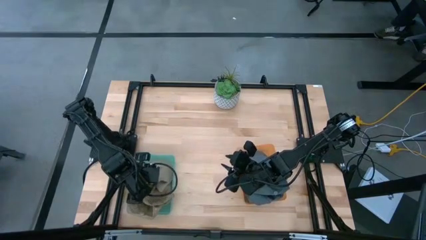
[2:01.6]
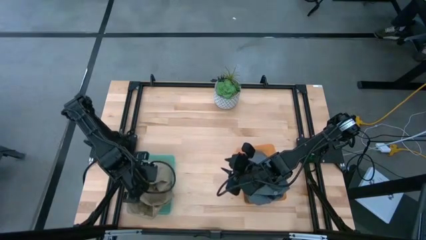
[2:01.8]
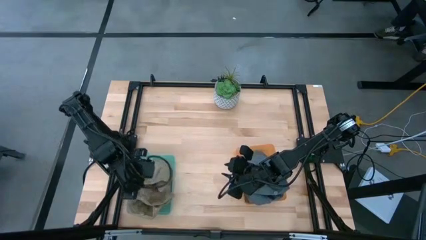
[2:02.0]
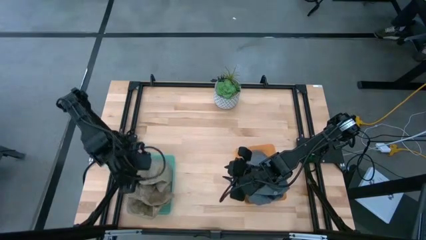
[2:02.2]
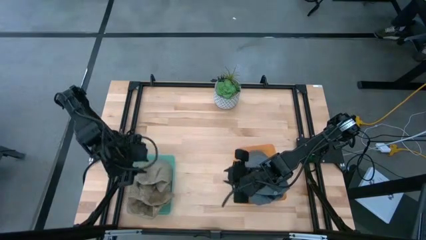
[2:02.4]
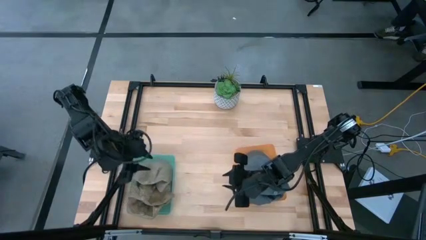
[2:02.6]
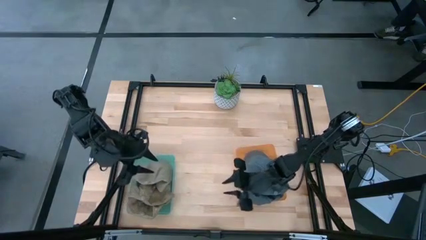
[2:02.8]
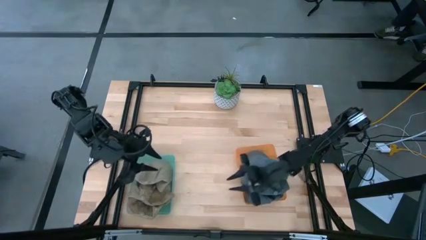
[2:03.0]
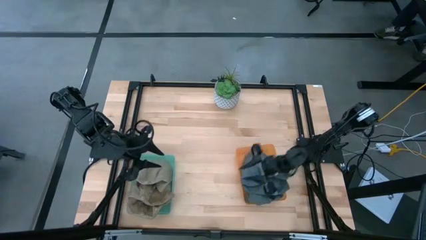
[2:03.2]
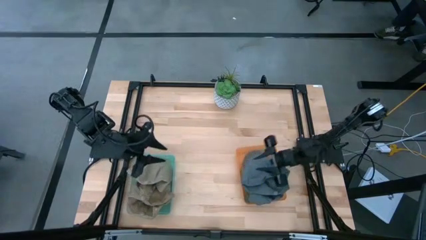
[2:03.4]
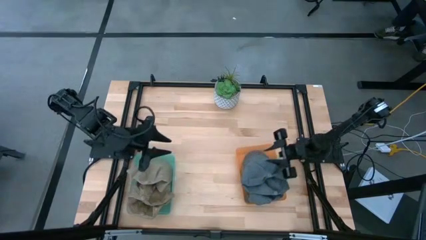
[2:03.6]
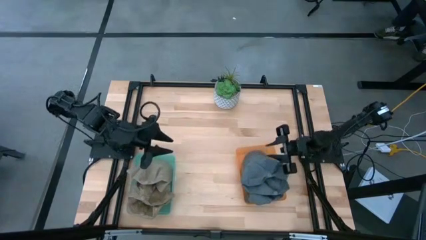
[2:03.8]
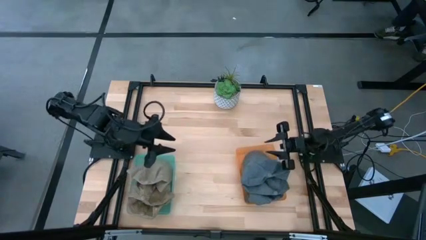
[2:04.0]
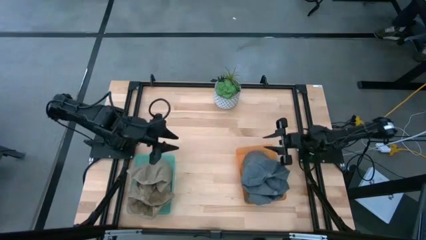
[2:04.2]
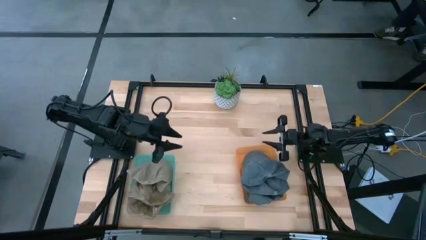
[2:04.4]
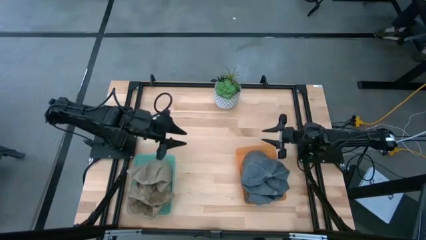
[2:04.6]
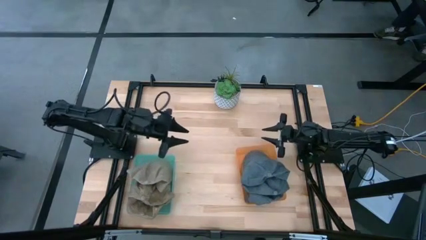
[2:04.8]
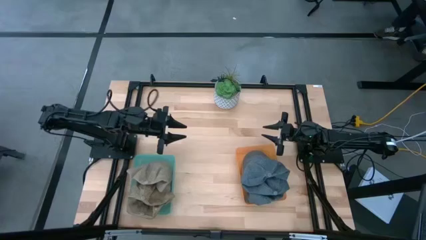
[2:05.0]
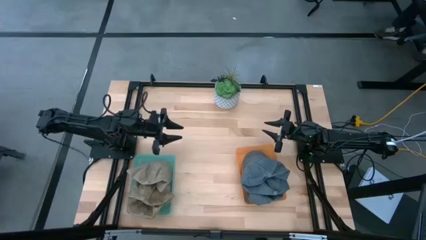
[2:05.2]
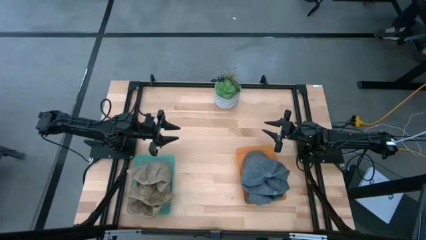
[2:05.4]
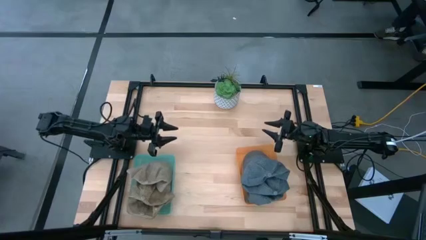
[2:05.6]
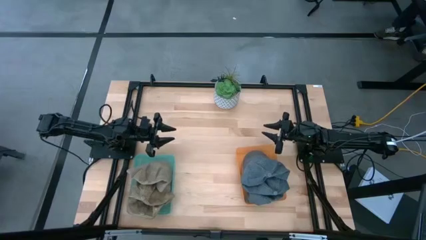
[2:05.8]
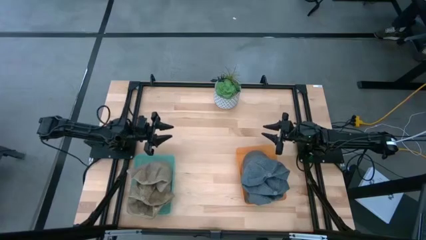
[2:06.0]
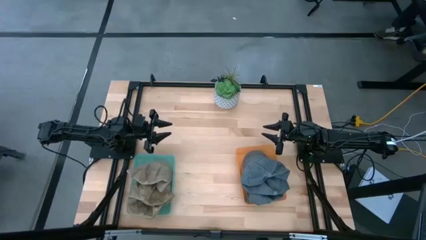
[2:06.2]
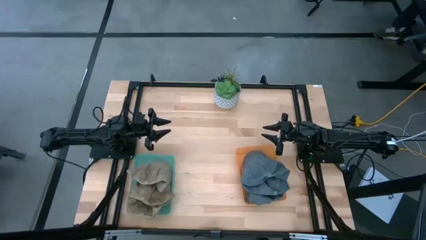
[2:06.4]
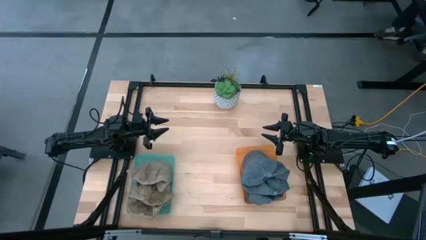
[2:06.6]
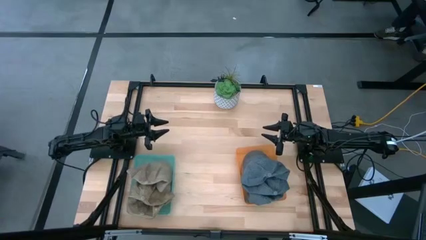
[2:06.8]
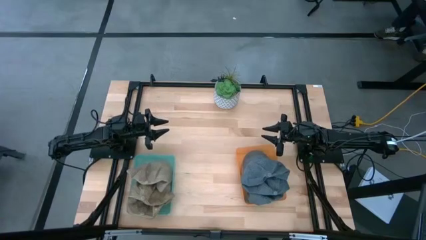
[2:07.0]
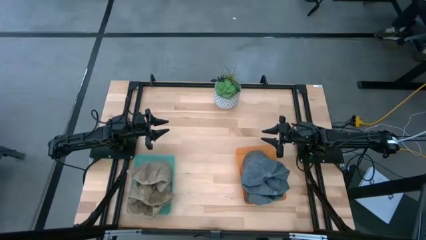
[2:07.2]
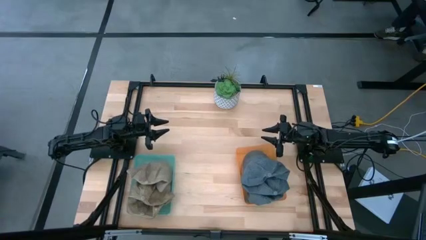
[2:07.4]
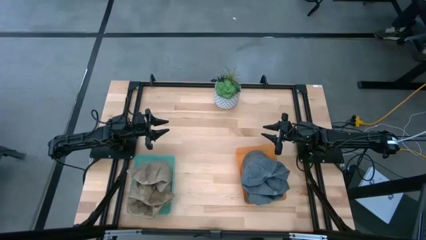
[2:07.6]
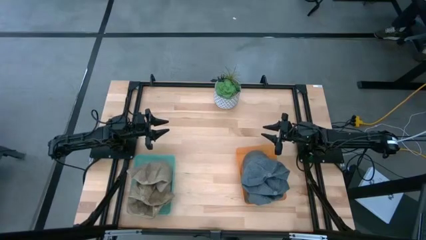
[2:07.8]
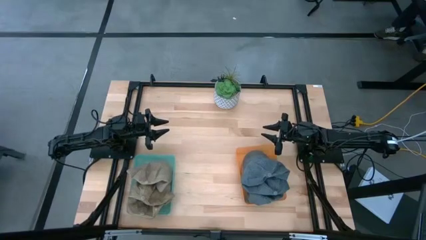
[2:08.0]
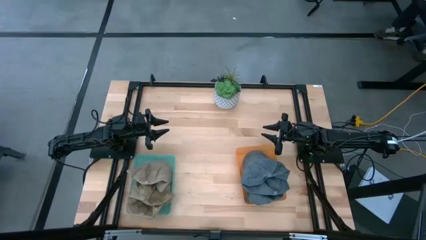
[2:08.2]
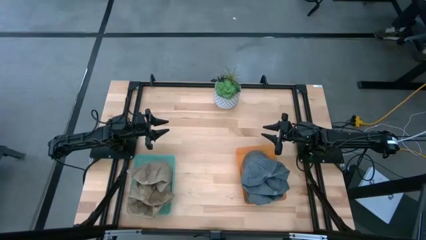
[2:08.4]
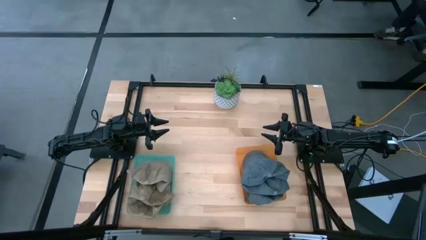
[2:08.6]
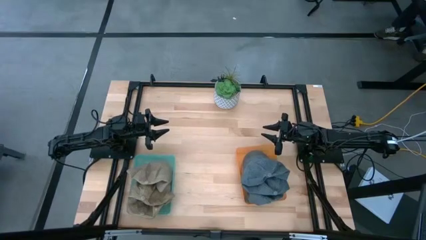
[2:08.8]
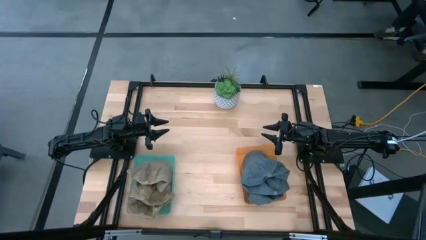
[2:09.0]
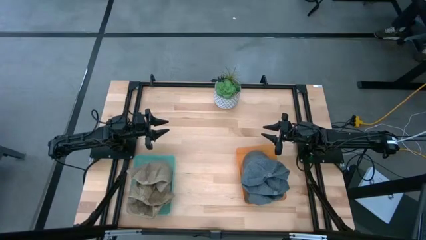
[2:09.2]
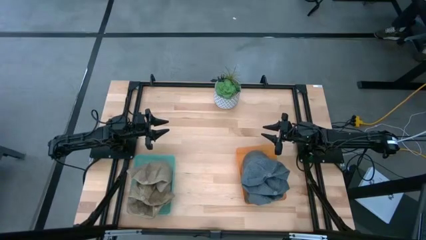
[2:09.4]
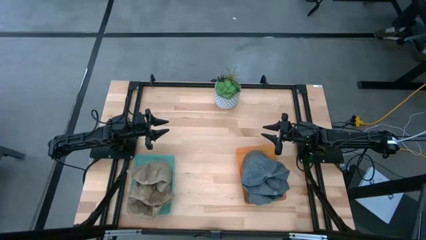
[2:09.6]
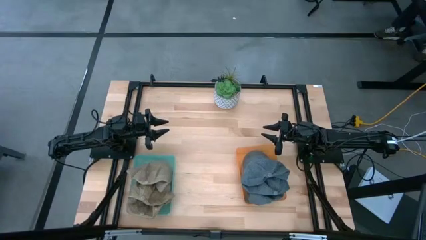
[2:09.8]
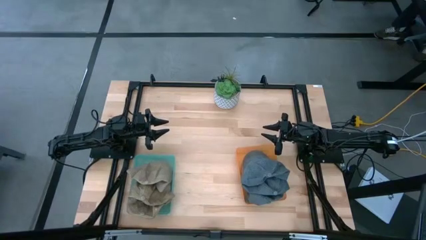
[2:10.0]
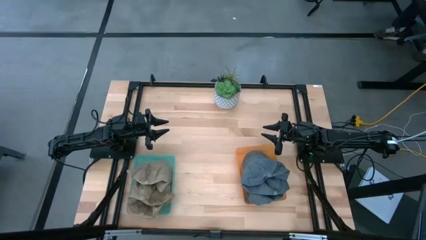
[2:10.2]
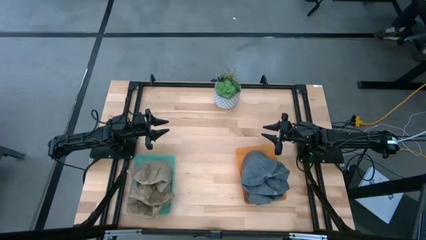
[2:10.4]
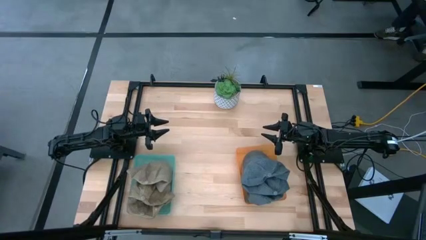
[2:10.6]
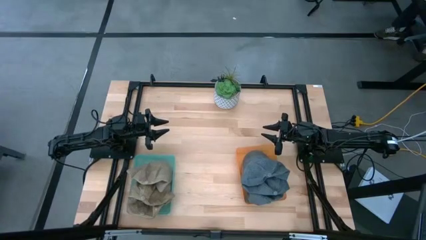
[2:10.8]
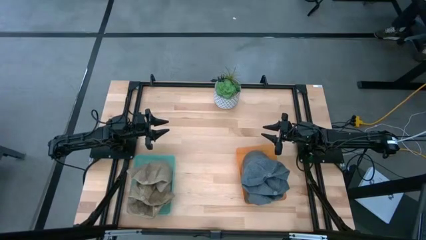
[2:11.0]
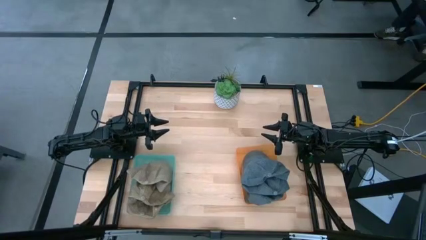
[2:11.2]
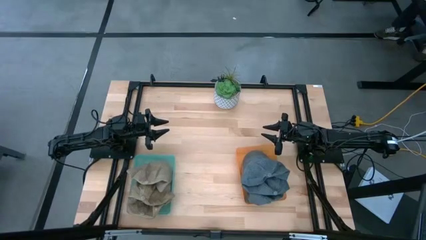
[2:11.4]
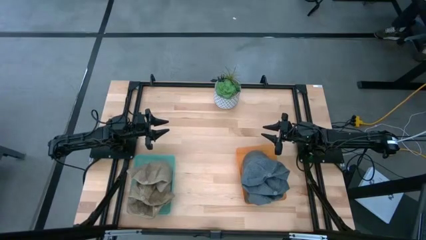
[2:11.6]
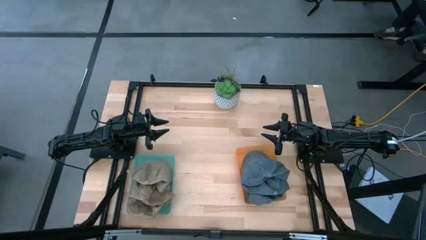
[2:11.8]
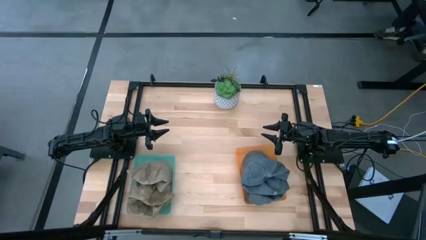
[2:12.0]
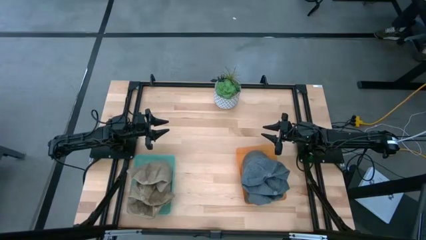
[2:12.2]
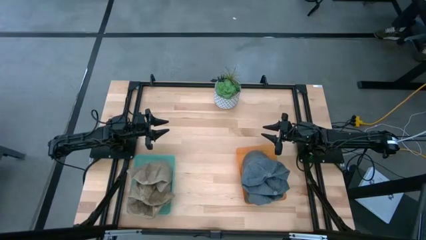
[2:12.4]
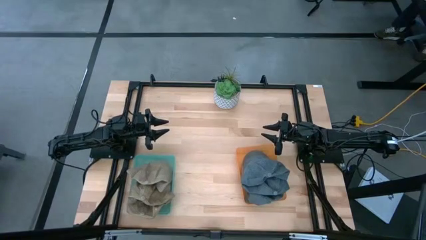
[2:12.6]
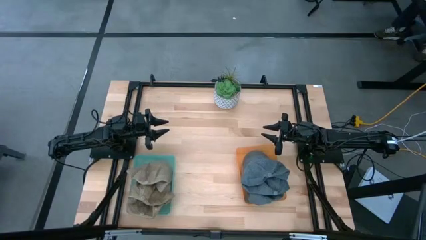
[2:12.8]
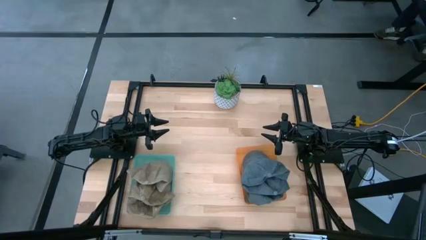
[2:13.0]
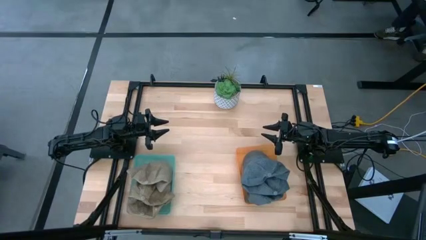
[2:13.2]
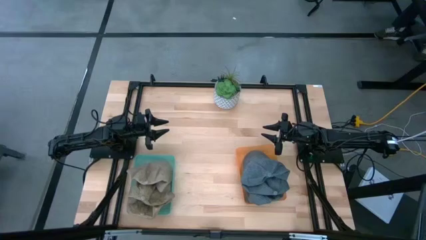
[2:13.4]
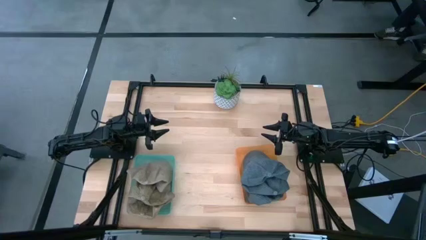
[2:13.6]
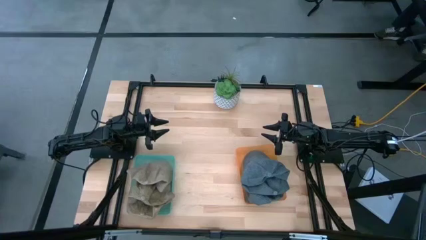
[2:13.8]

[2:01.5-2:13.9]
Task: Pick & Place hat
Return to Home Position

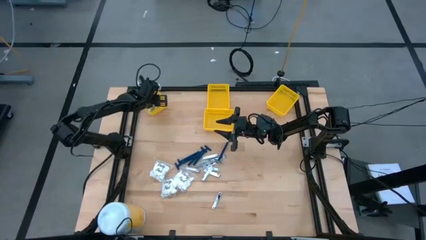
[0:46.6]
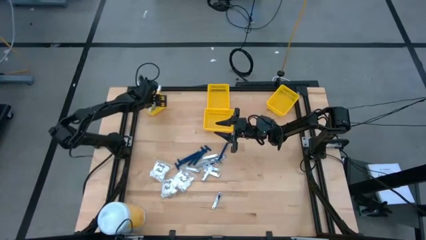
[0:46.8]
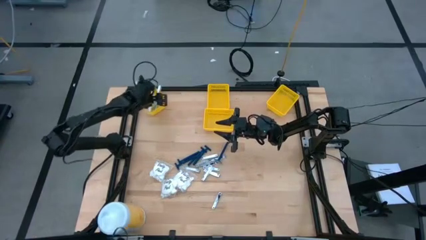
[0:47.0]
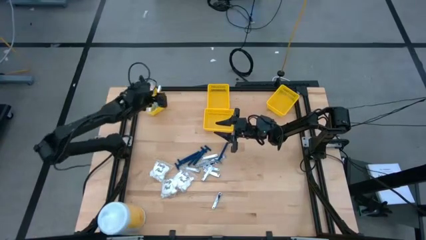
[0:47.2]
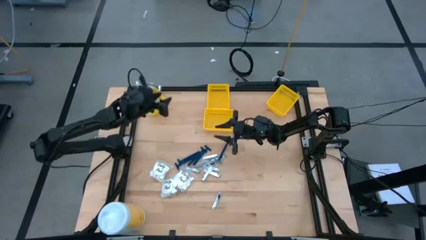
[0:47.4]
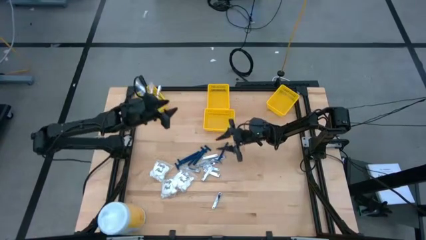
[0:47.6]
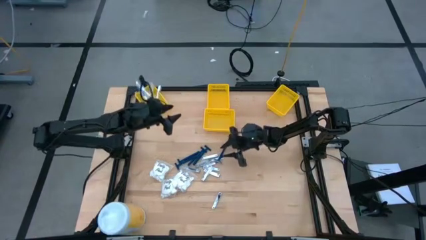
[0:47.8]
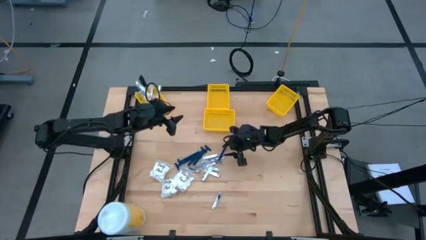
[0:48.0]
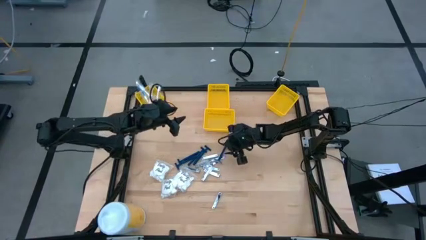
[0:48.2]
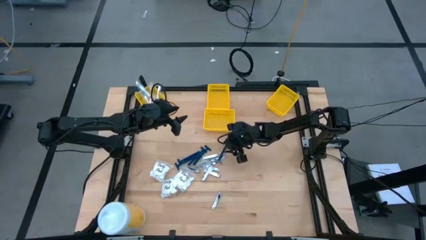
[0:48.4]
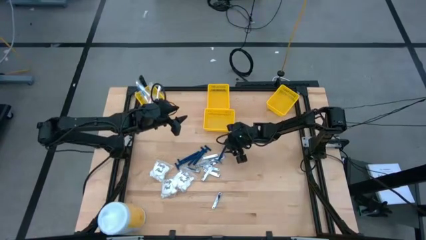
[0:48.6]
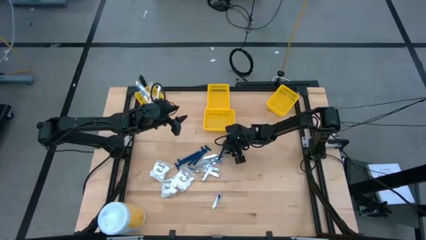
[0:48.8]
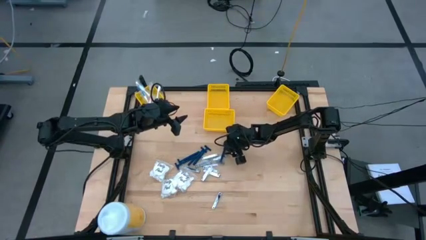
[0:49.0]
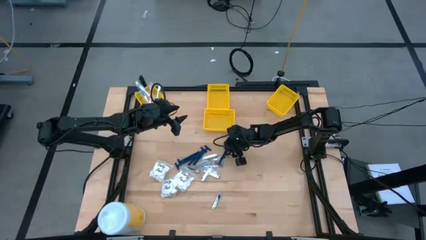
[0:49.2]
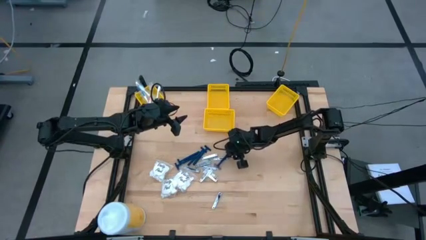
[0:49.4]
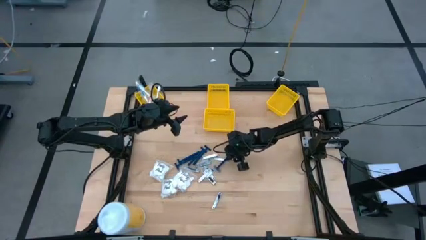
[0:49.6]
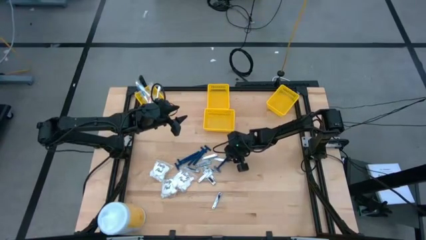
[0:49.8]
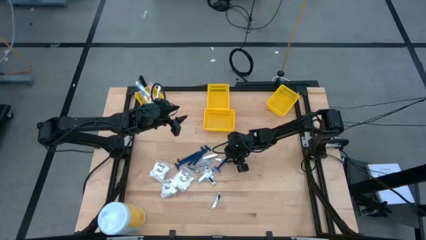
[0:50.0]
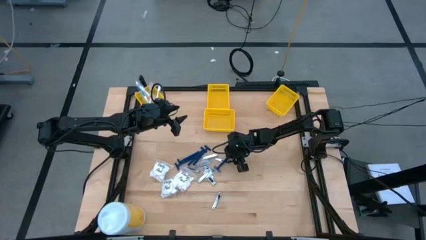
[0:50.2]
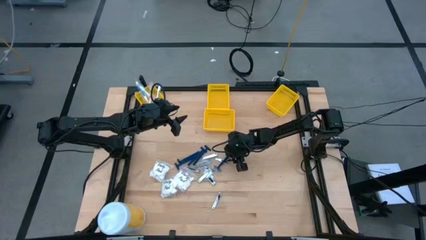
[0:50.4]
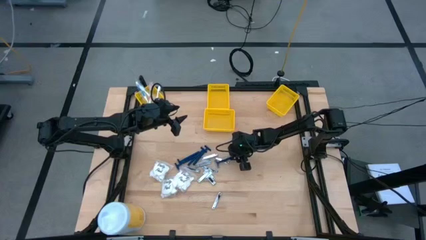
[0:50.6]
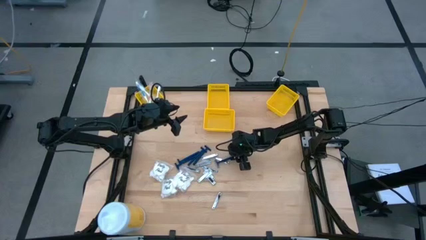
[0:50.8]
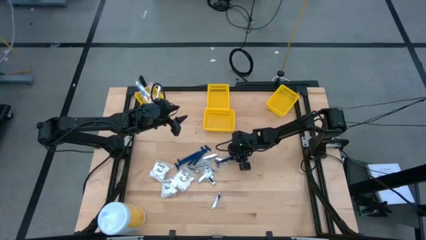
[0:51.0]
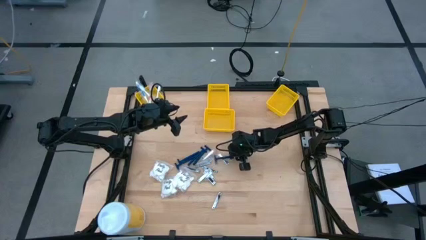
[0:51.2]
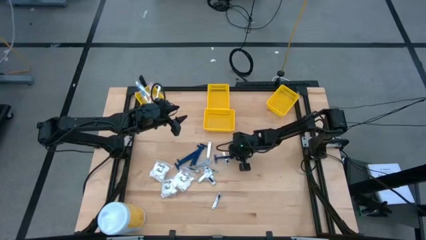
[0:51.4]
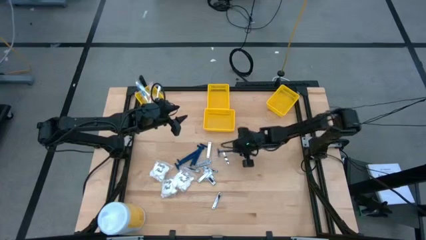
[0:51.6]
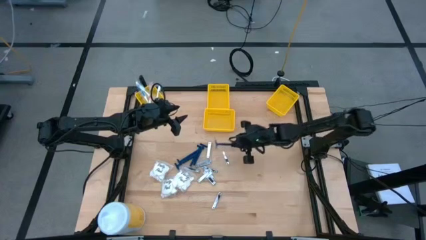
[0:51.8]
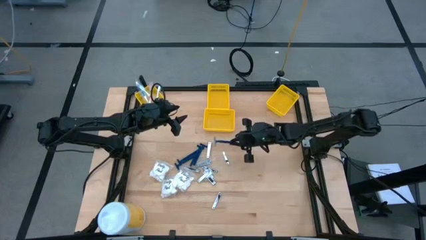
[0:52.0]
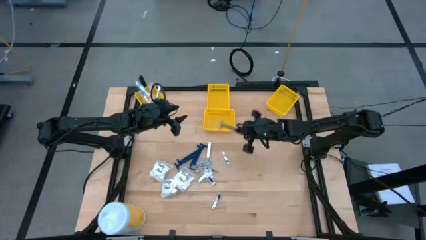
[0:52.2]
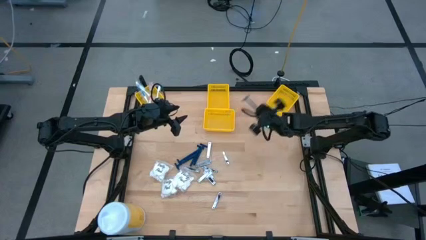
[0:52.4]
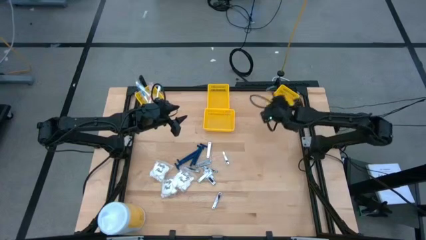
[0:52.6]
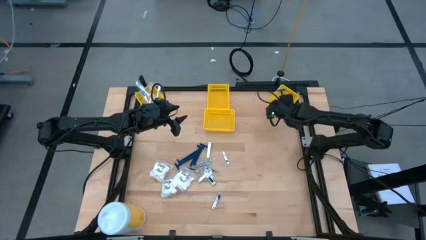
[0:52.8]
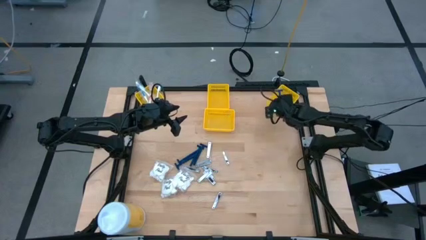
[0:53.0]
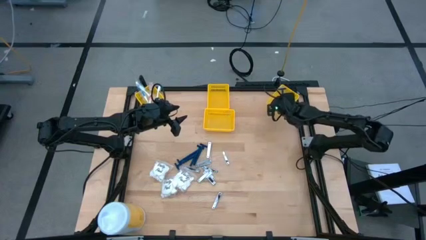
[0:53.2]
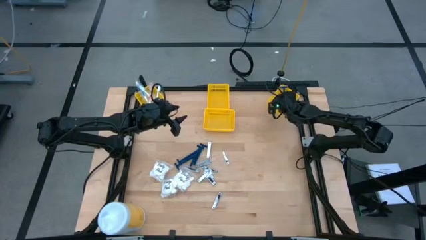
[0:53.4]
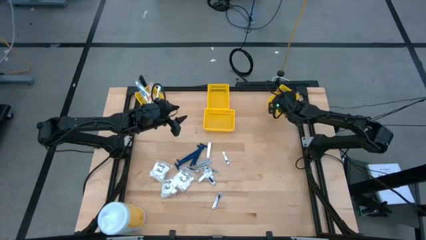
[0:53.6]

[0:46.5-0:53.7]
Task: Pick & Place Travel size toiletries
Put the blue razor into the right yellow bin
